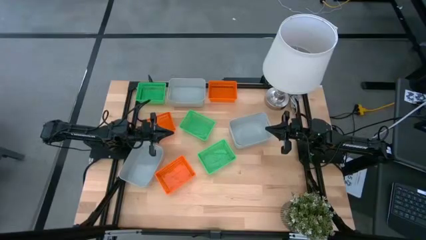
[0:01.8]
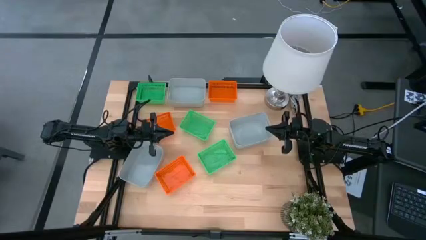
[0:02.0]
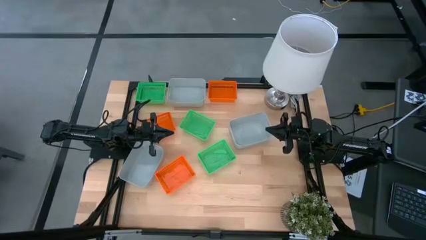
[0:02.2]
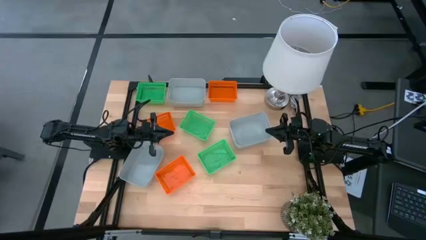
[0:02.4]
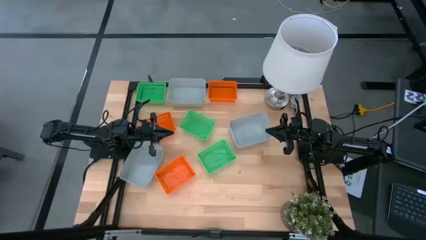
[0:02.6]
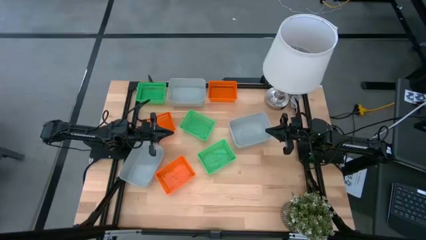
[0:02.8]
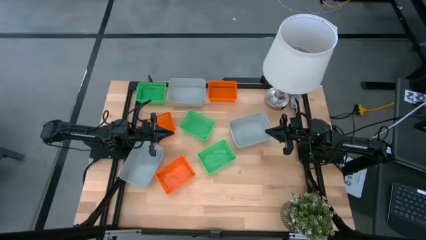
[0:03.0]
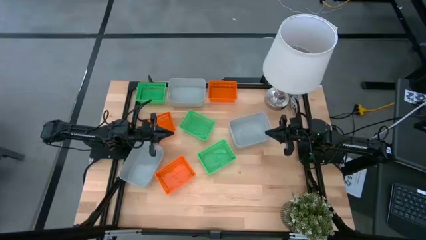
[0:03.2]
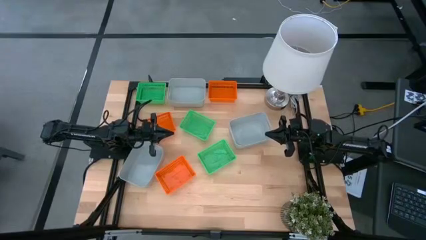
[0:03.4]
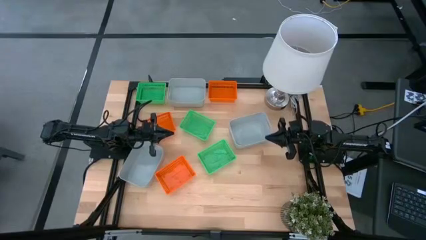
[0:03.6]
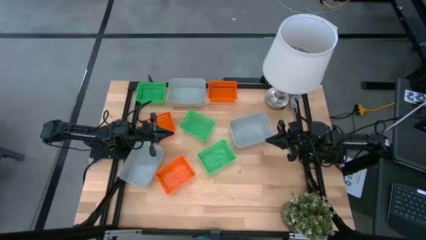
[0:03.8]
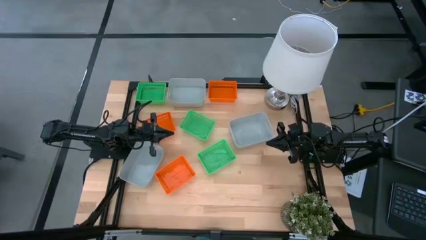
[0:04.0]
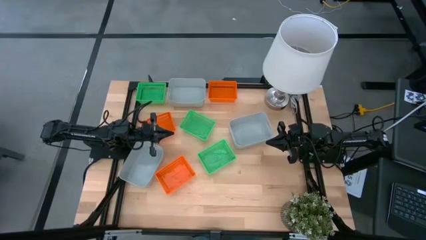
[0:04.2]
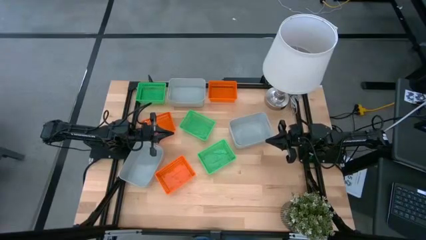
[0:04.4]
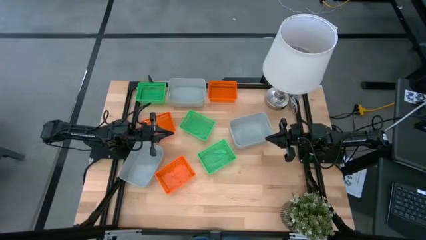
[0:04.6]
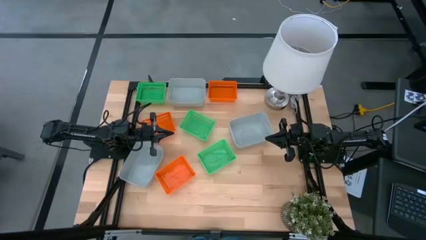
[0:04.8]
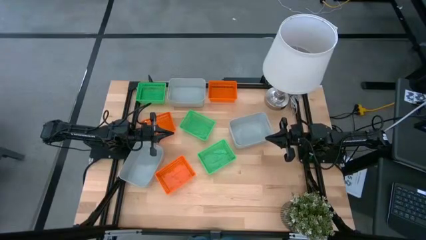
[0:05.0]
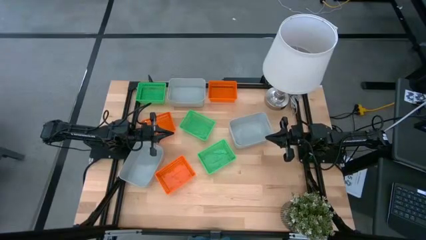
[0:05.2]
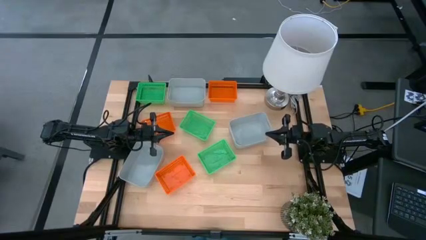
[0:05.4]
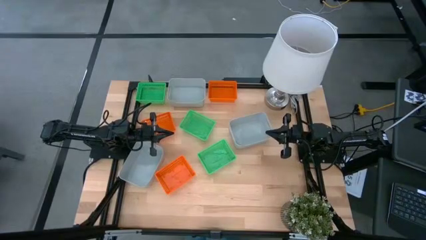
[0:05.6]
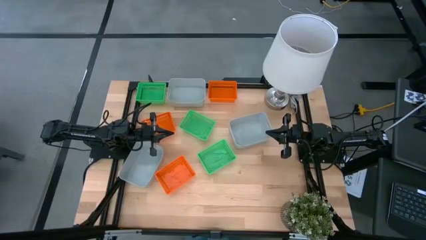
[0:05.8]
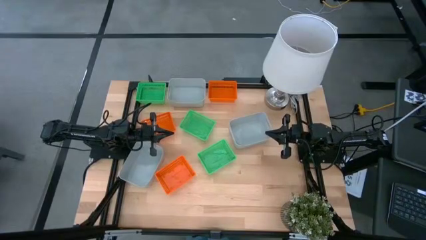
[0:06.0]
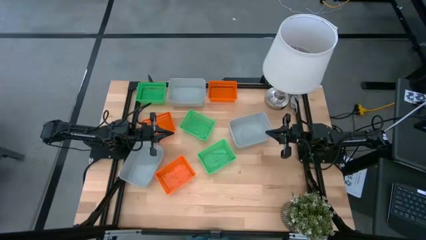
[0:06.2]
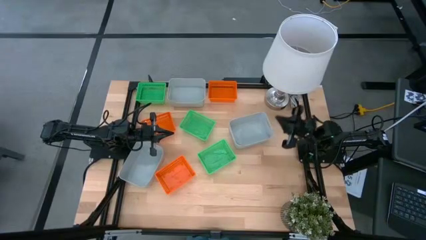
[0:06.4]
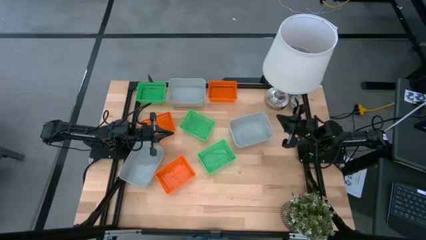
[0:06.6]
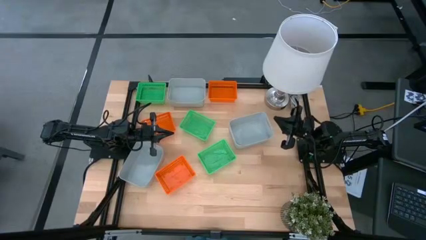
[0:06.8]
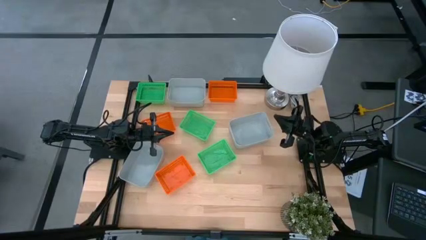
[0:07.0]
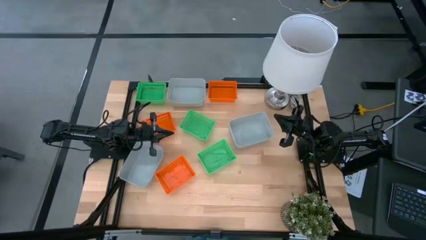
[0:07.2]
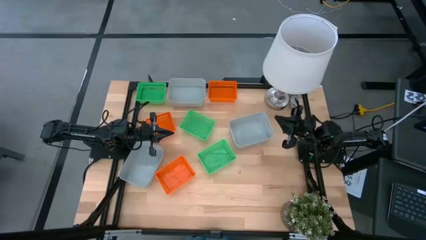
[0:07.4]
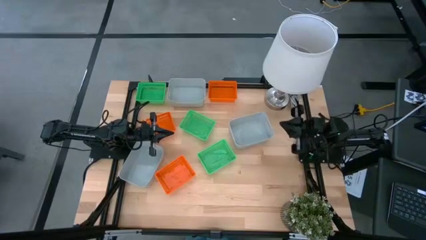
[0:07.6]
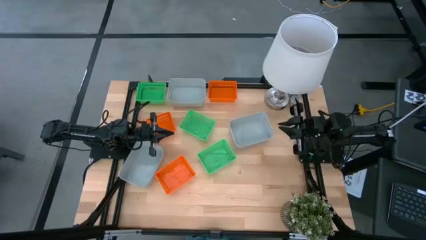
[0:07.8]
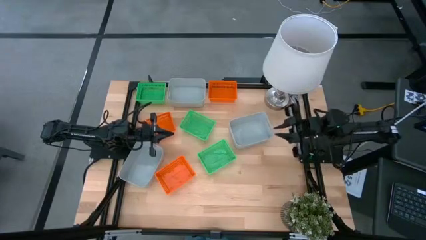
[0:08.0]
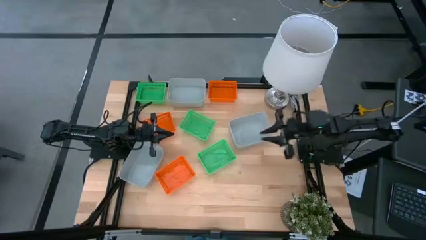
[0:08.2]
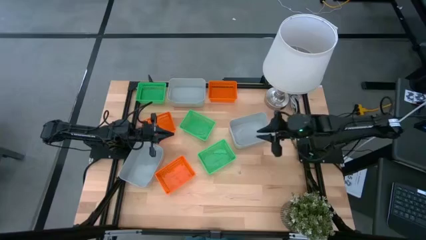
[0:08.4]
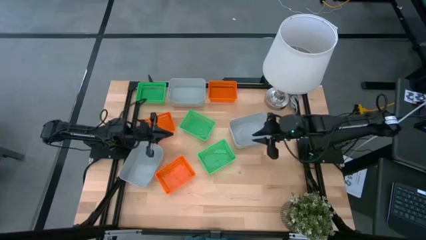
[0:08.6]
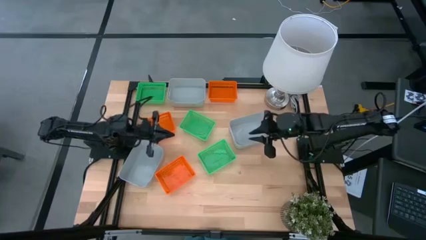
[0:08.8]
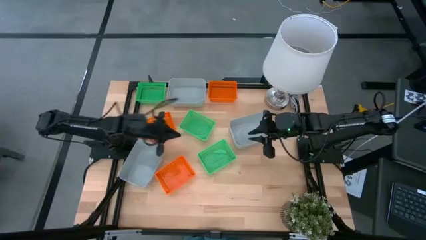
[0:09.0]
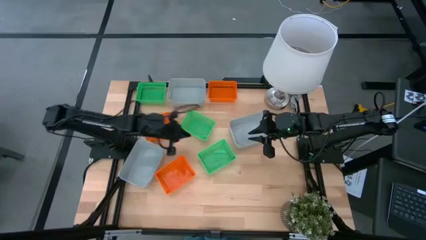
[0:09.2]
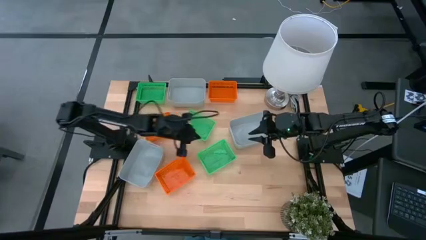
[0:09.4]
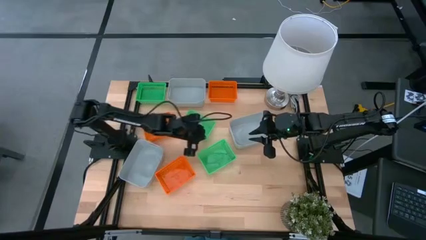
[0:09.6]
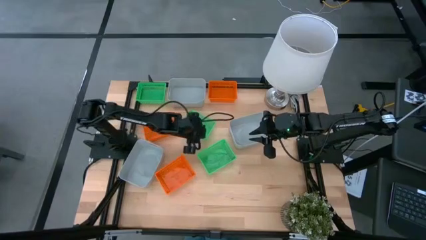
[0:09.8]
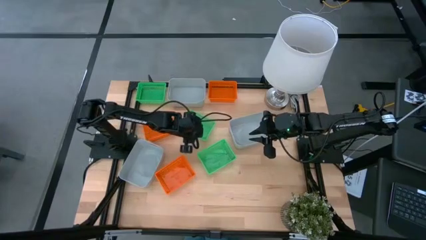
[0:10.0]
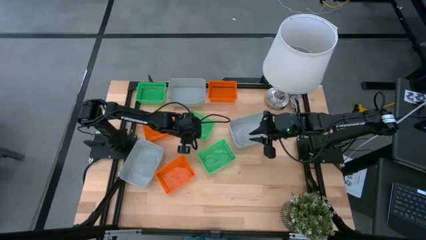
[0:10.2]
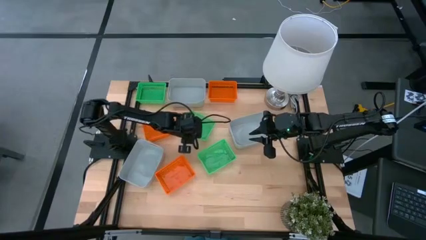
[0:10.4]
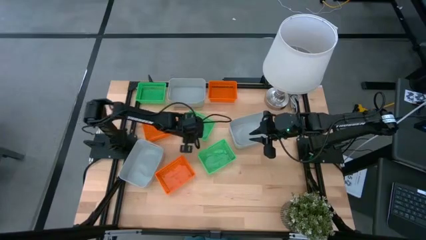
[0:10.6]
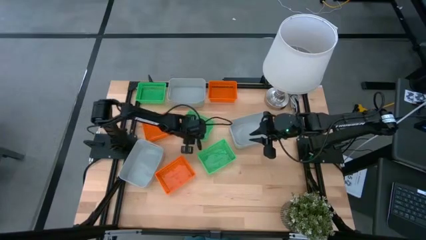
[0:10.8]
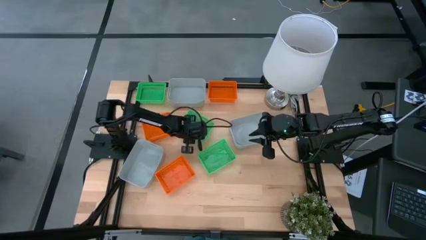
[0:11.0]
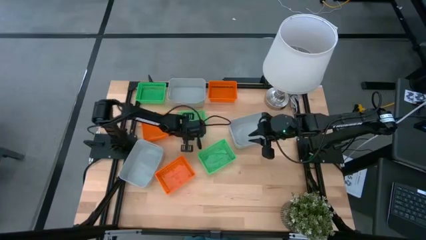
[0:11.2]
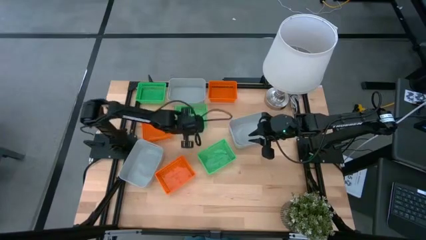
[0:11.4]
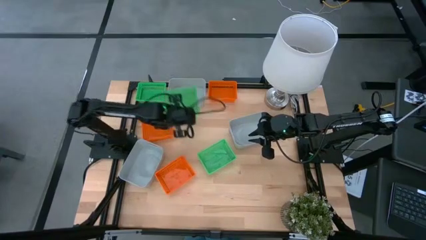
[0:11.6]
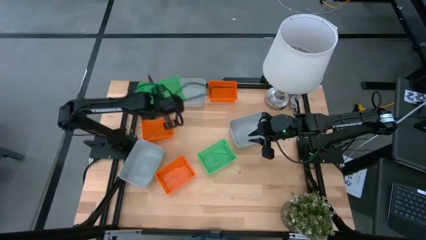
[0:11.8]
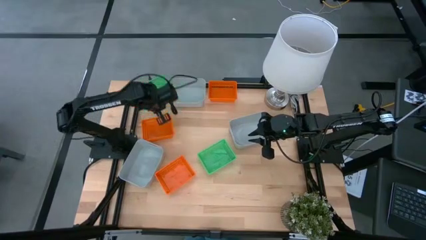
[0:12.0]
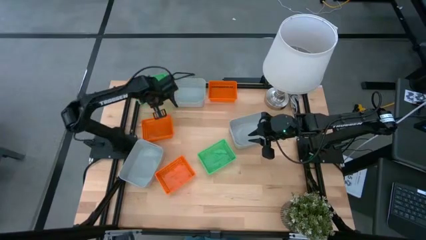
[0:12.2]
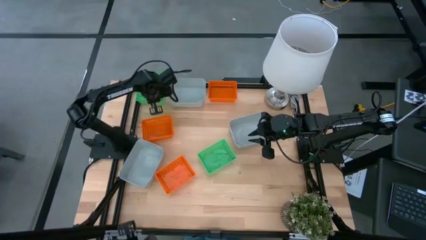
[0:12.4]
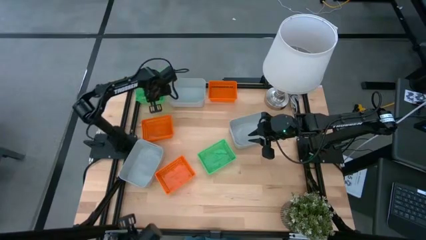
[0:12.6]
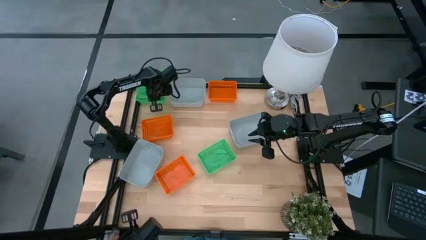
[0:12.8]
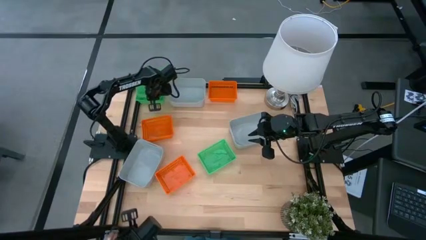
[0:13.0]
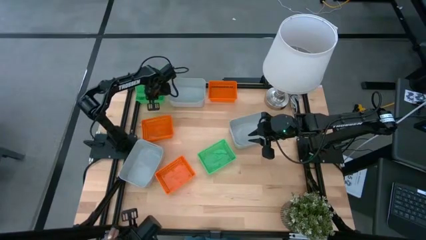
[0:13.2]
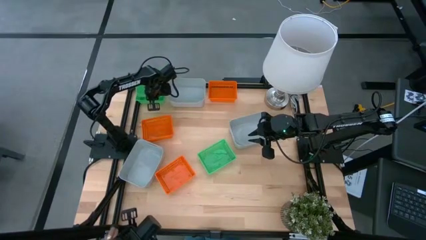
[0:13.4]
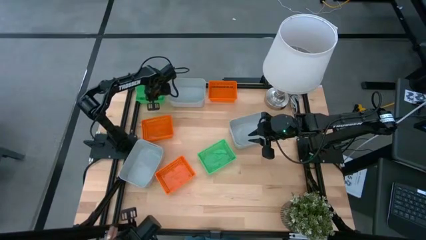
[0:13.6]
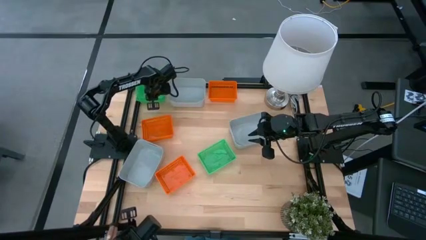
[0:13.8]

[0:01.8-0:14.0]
Stack the middle green bin on top of the top green bin
